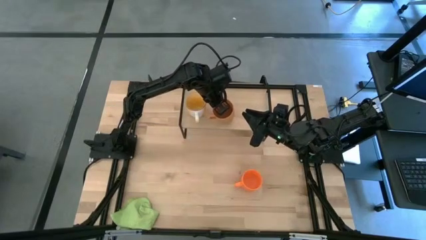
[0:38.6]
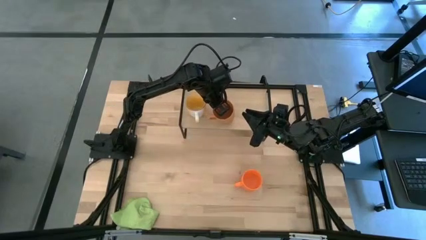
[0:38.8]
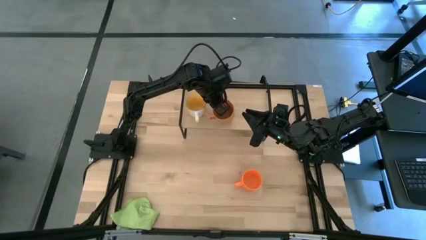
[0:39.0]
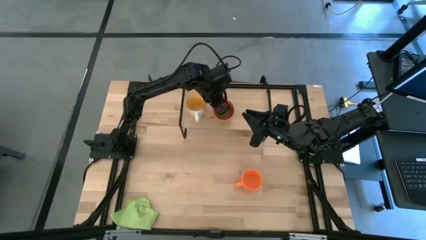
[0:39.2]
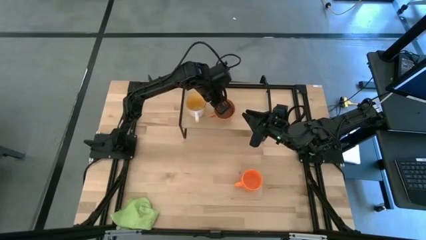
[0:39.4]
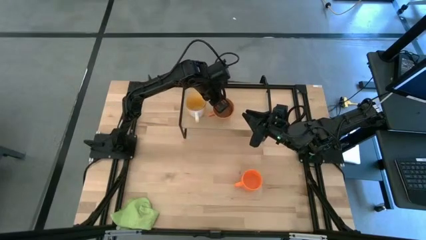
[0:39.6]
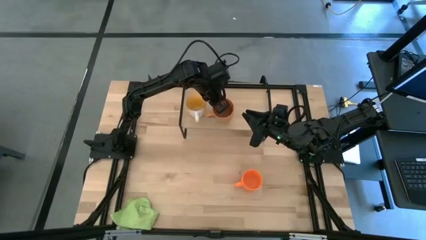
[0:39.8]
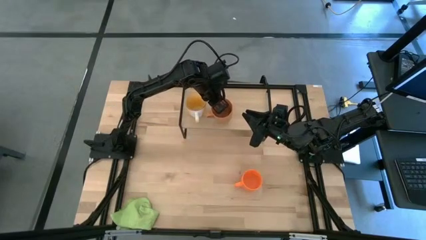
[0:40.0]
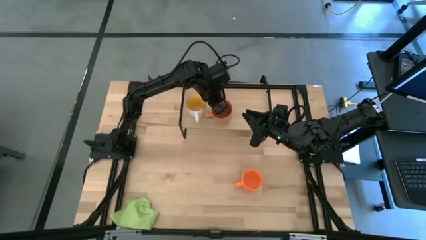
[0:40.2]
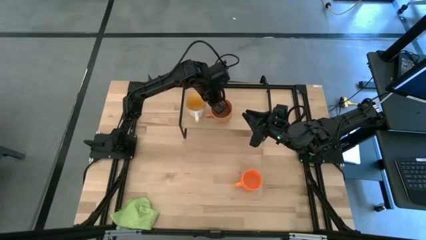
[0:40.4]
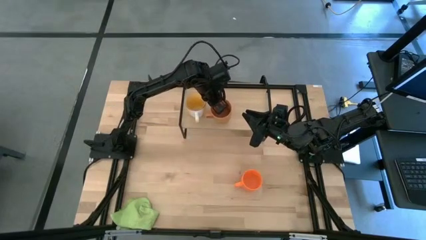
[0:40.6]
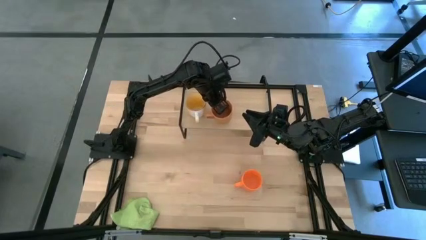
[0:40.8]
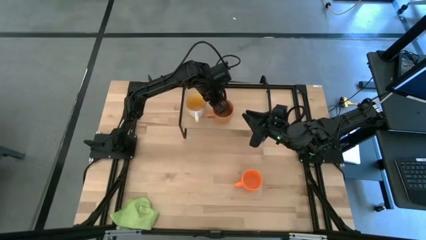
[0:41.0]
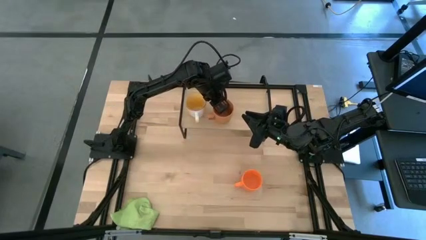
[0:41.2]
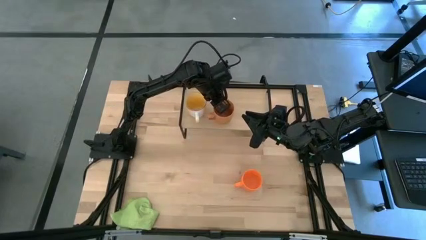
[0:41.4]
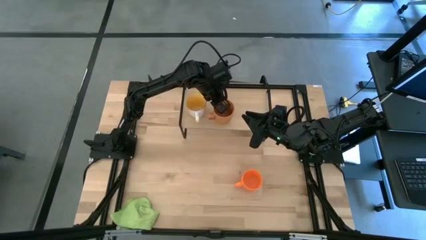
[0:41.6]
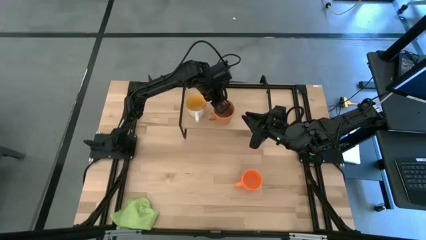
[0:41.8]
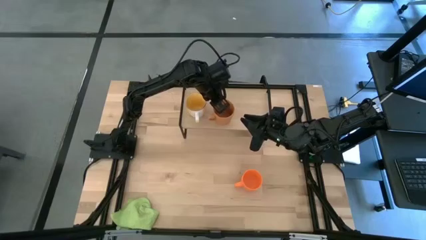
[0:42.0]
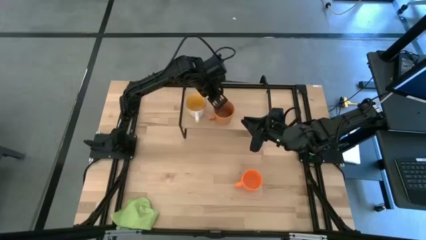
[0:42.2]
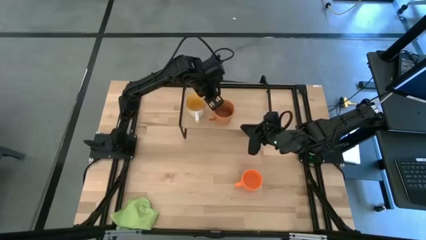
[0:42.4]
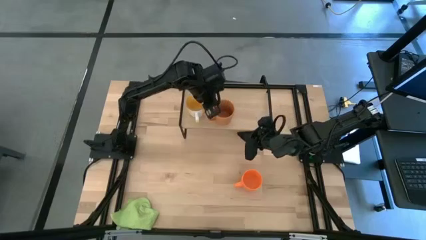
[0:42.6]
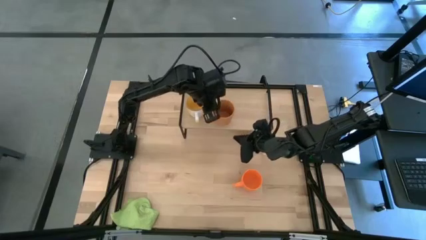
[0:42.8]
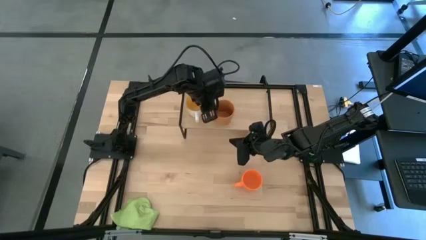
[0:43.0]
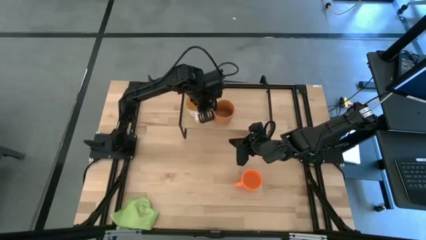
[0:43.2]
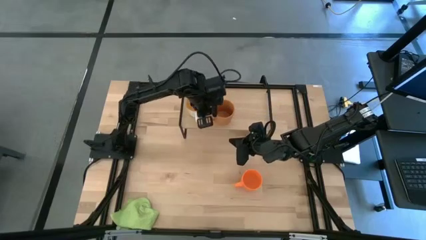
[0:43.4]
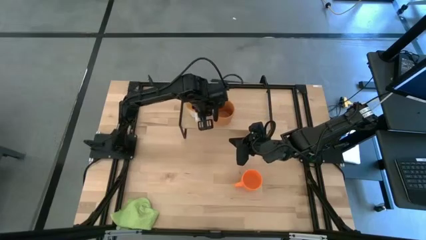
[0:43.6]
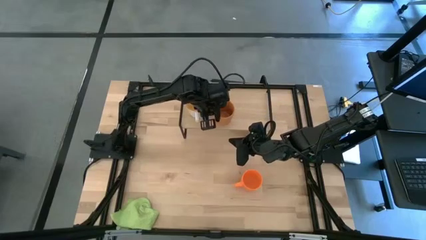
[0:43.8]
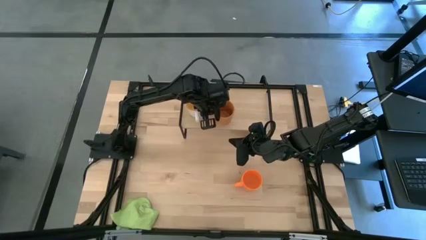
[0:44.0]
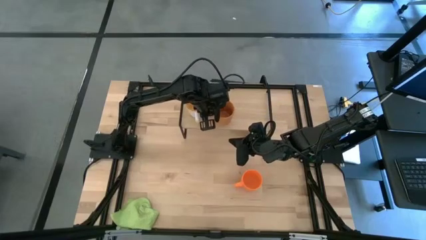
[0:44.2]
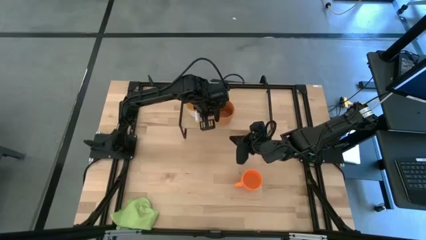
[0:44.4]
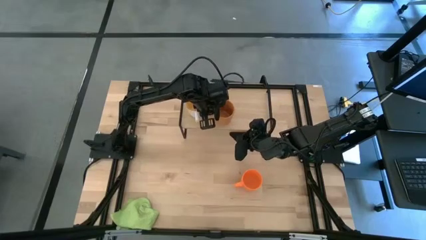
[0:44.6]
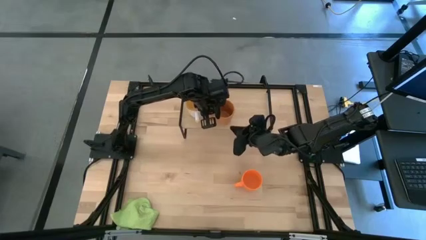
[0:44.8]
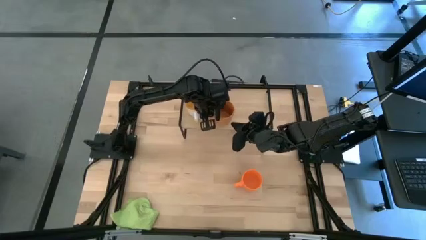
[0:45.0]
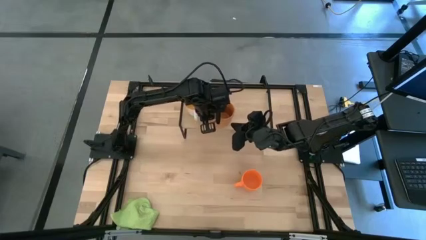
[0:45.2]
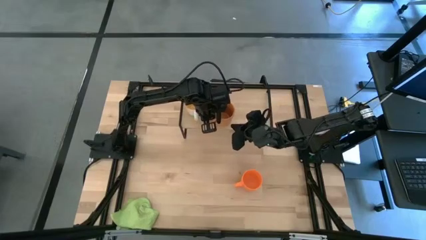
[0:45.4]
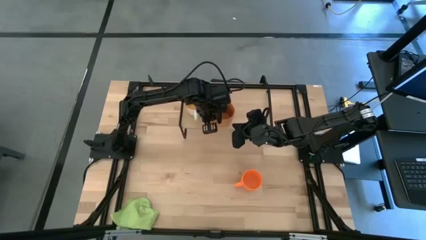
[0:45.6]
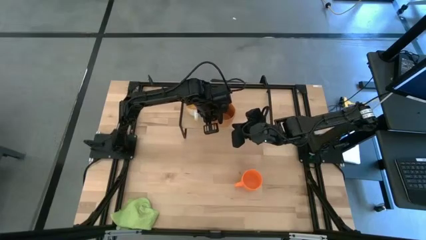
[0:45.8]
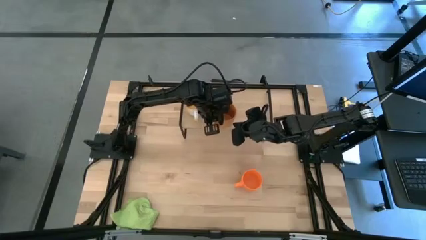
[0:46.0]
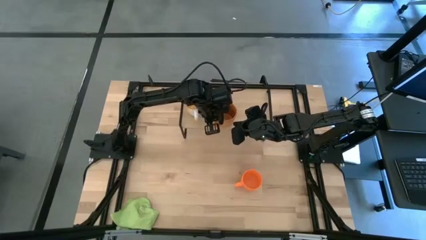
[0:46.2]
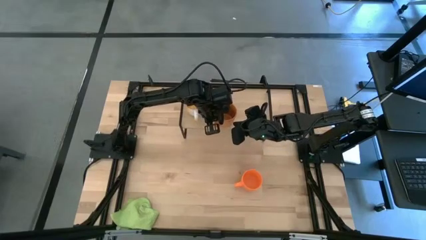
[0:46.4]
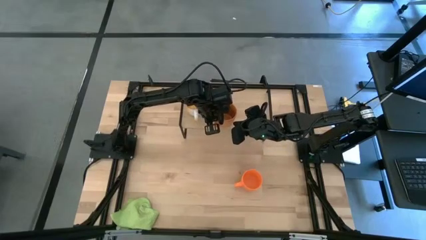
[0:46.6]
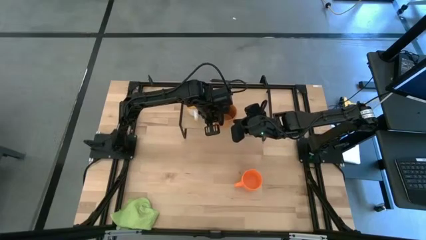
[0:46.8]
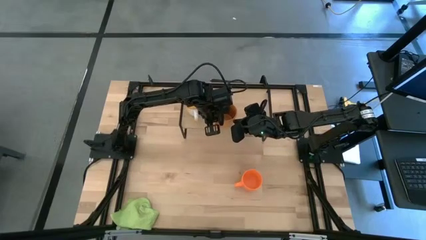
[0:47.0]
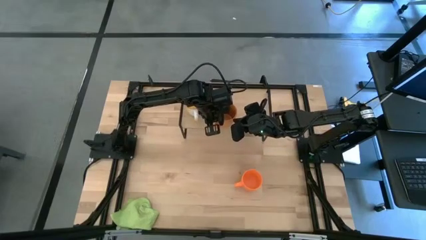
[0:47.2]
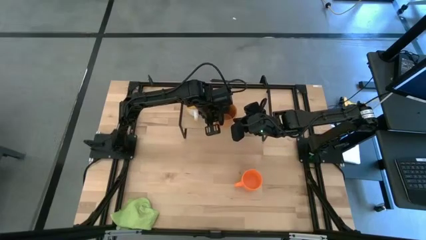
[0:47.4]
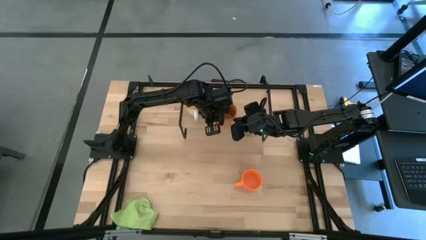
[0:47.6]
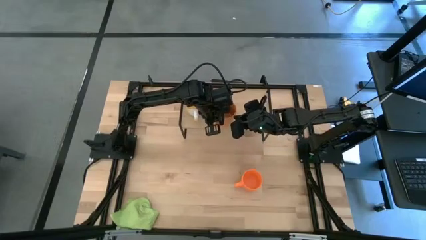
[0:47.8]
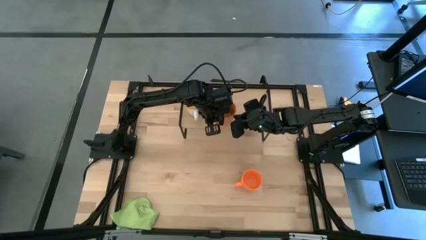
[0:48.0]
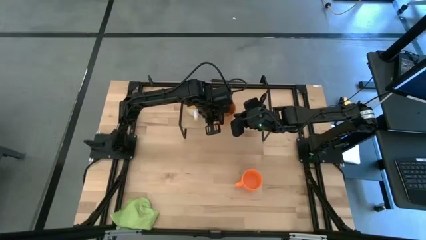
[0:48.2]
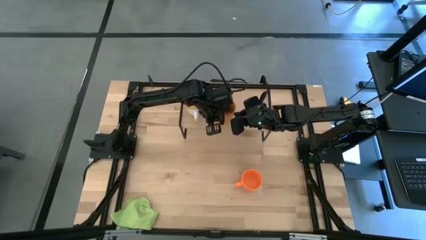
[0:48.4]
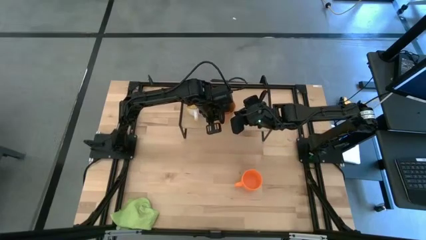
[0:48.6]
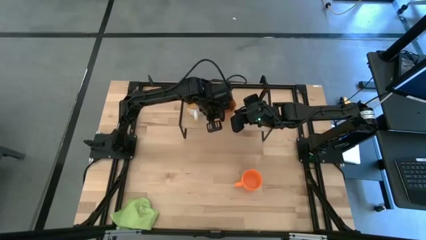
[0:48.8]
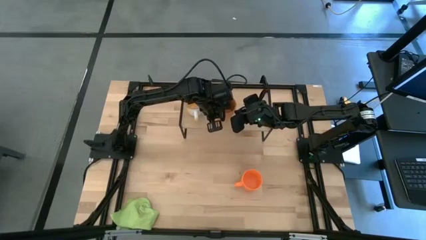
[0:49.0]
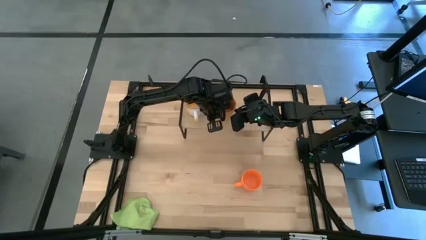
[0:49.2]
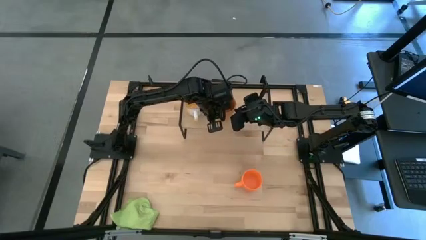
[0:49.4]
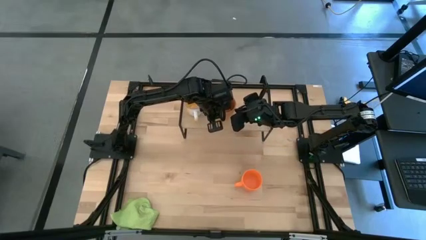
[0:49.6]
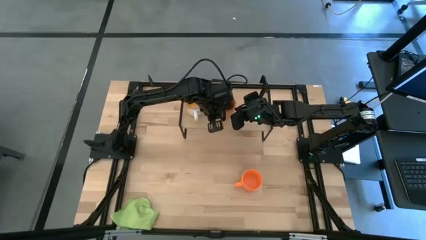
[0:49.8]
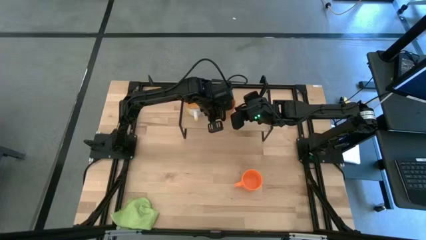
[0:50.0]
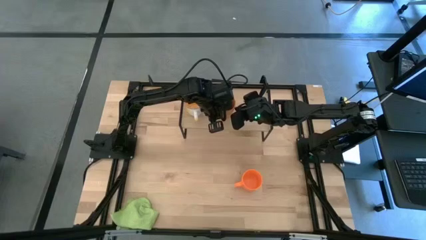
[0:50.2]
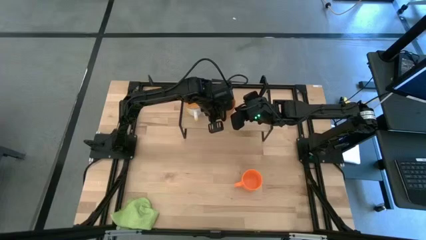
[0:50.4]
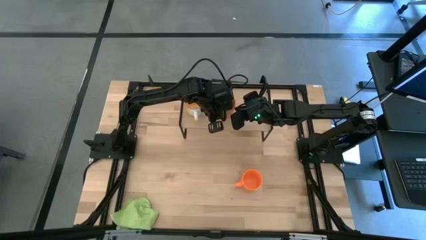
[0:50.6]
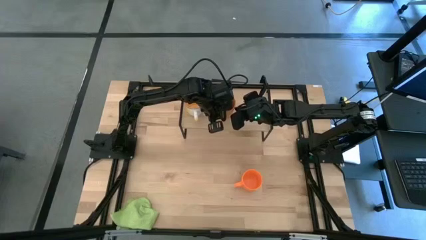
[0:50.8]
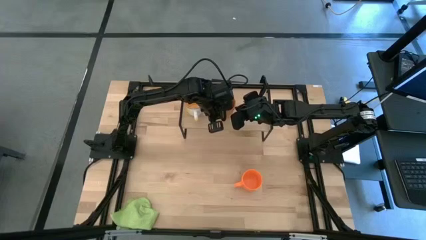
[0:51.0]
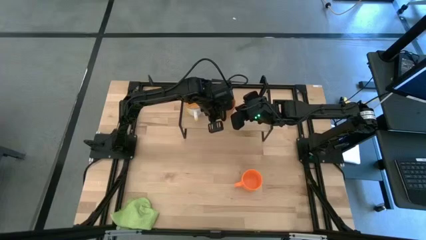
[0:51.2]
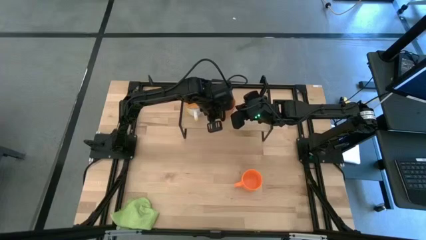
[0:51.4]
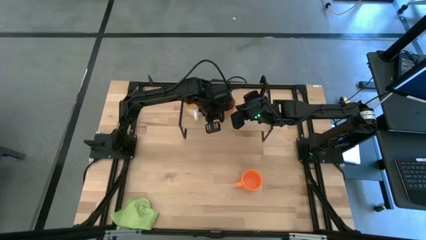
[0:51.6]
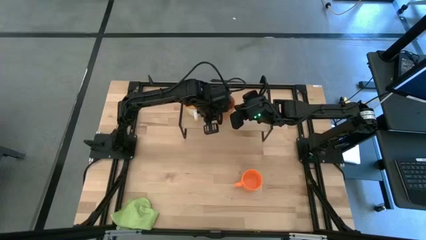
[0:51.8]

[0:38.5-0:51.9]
Task: Stack small to large cups/mugs on shelf
Put the brown mug on the shelf

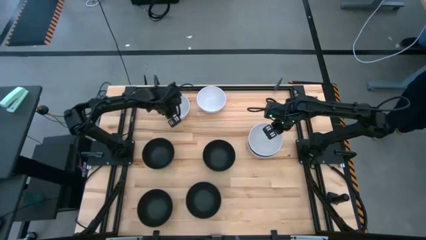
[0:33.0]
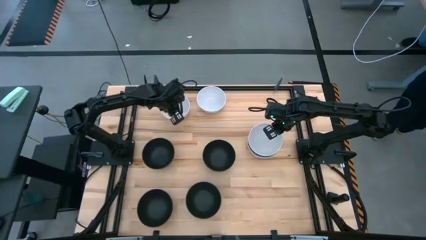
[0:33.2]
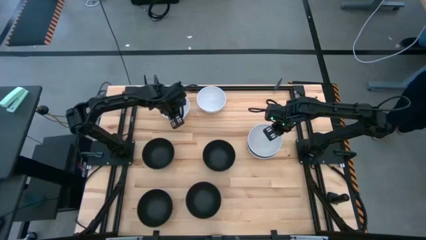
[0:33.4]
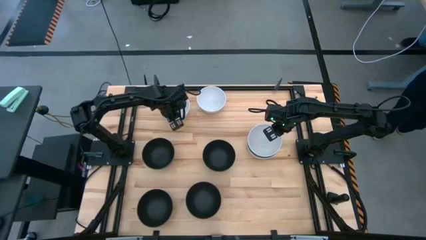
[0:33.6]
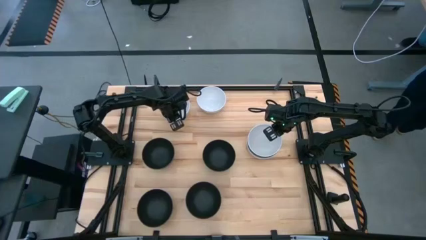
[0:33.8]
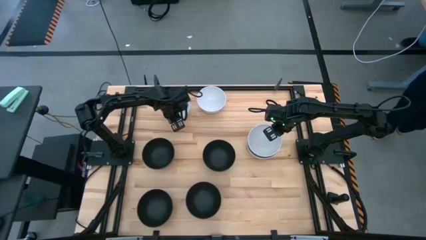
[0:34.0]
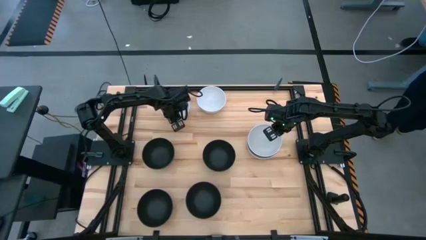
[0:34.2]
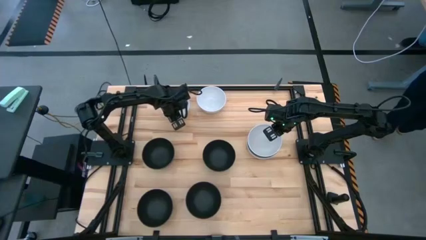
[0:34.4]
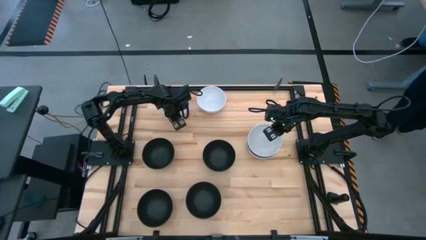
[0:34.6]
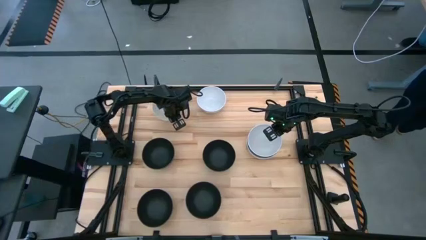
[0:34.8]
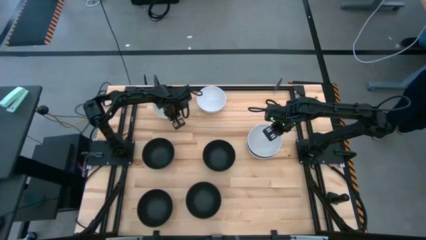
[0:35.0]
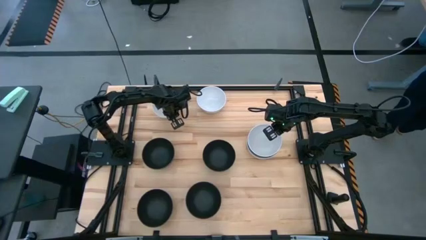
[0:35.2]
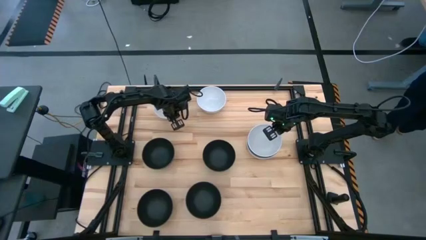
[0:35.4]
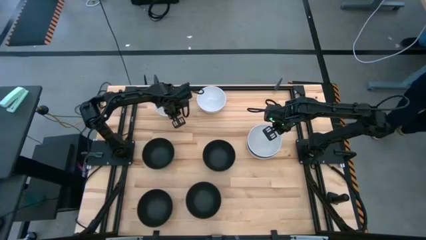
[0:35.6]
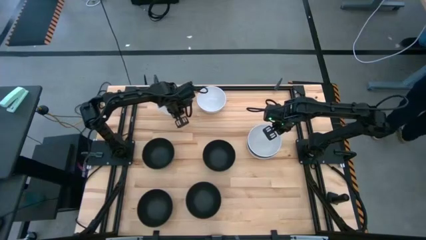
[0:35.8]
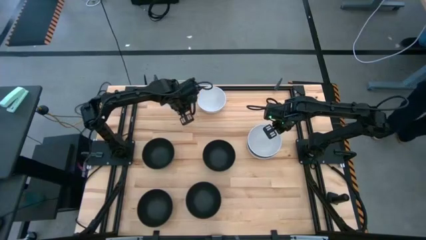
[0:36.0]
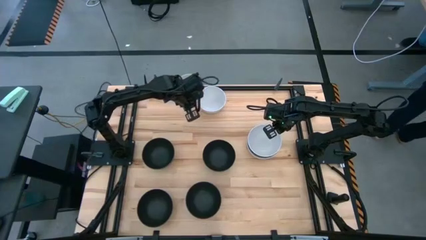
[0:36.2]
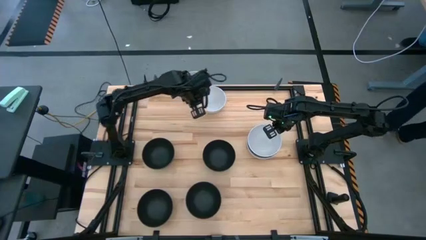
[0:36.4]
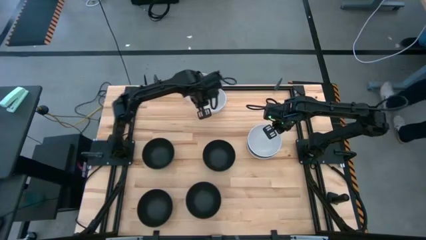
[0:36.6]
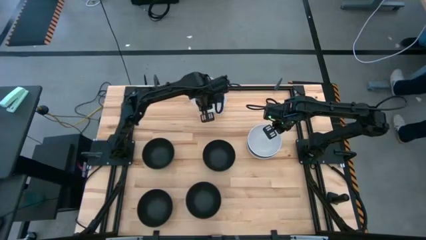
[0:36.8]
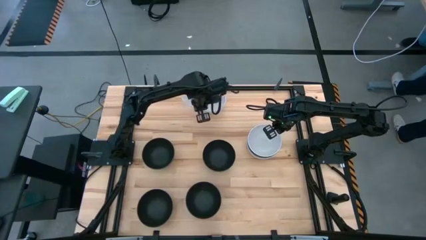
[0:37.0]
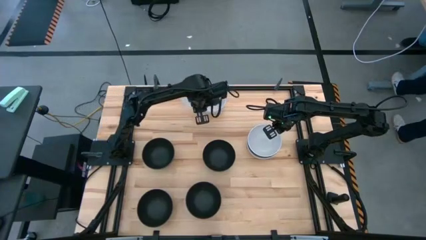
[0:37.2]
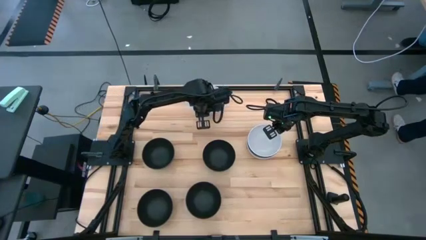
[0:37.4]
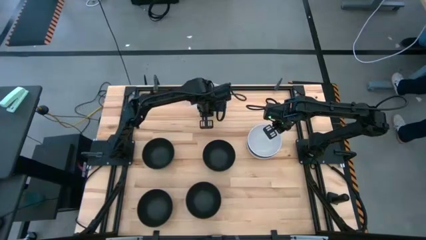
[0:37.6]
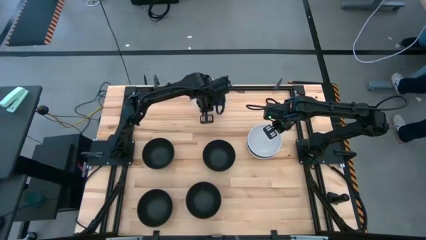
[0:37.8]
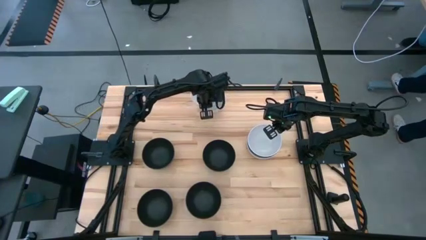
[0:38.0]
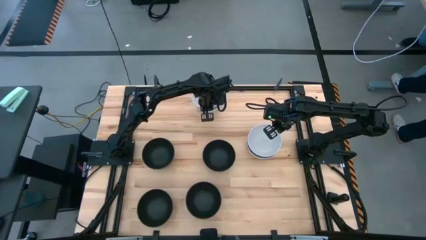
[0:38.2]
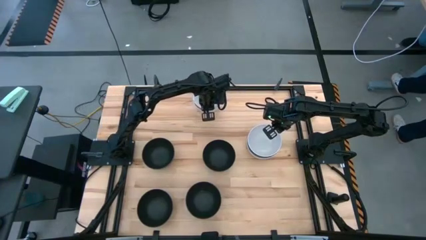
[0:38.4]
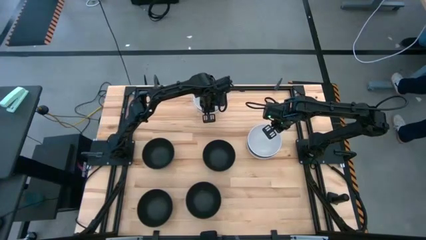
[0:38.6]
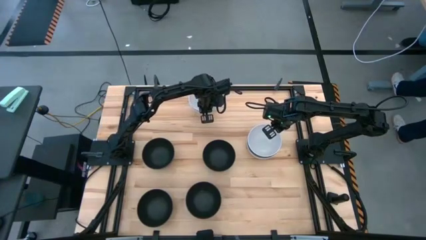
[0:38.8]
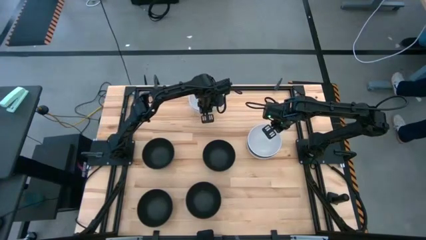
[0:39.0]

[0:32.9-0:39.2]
Task: Nest bowls inside each other
Stack the white bowl on top of the white bowl
